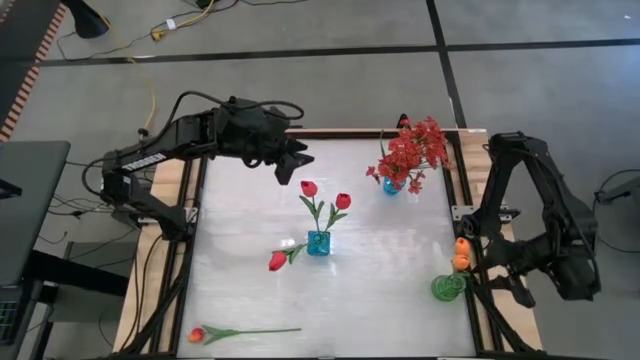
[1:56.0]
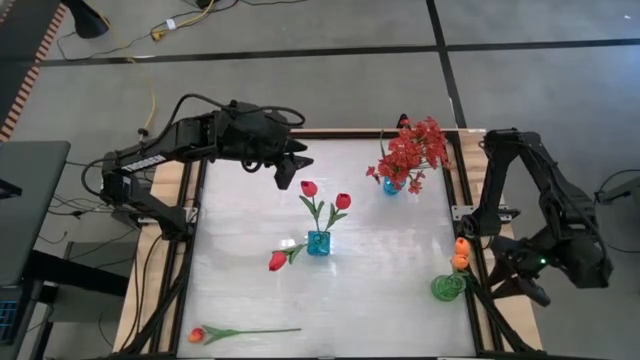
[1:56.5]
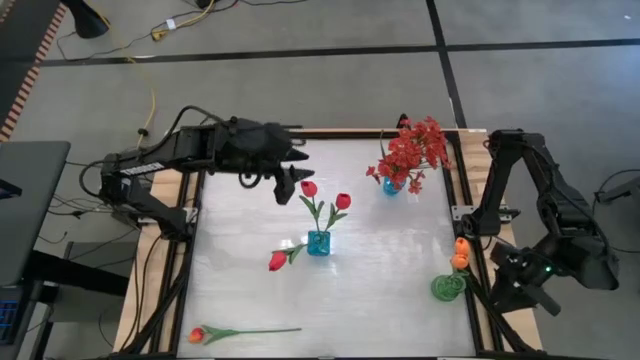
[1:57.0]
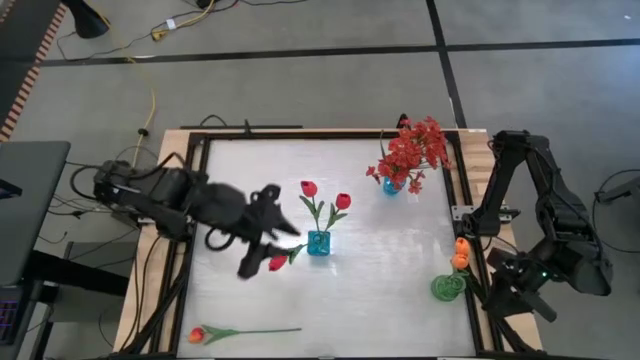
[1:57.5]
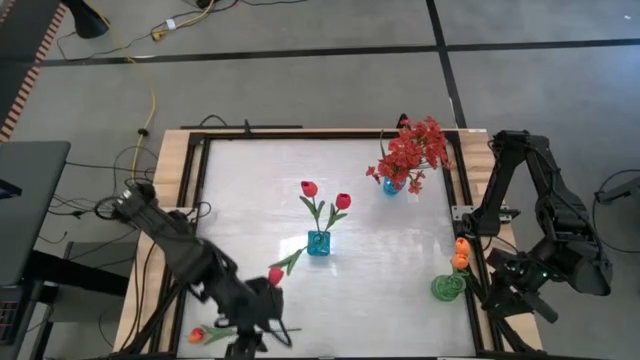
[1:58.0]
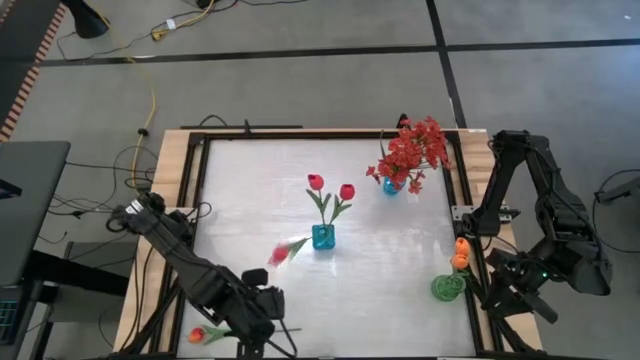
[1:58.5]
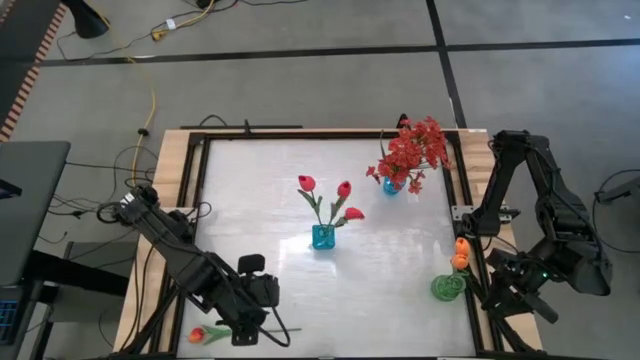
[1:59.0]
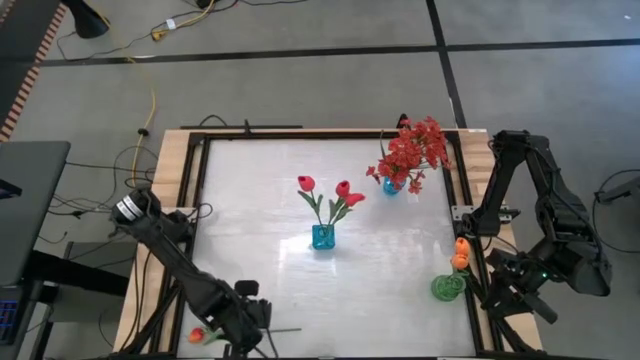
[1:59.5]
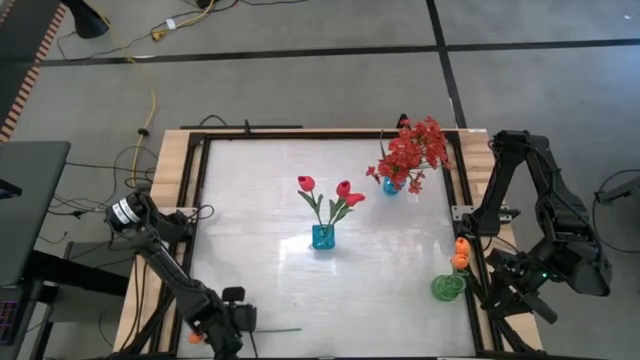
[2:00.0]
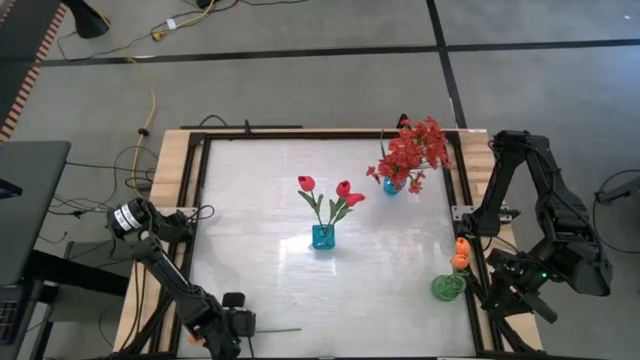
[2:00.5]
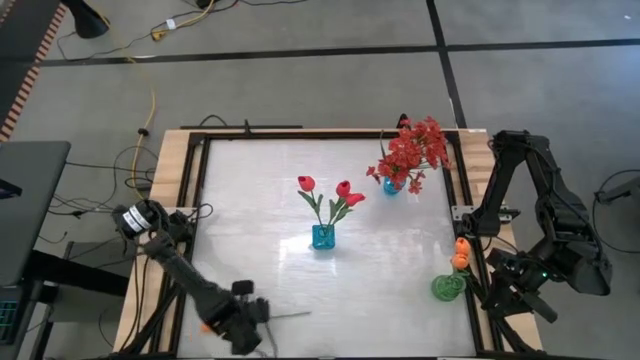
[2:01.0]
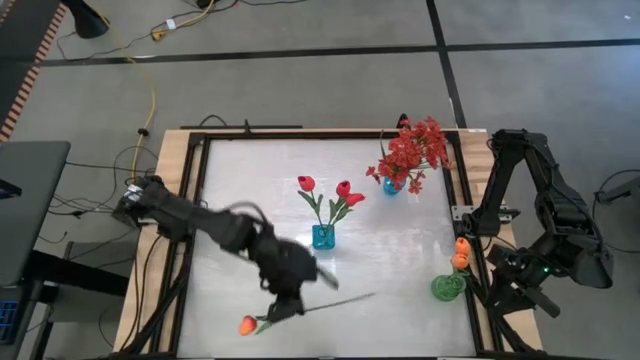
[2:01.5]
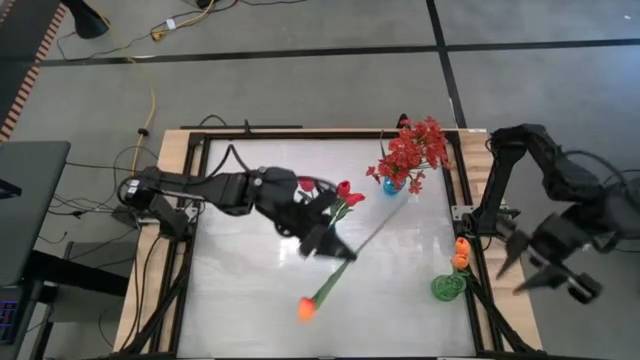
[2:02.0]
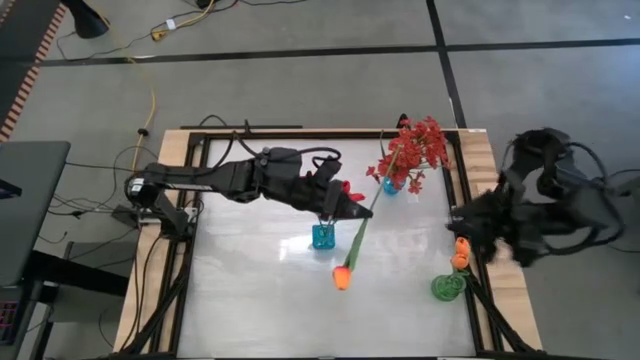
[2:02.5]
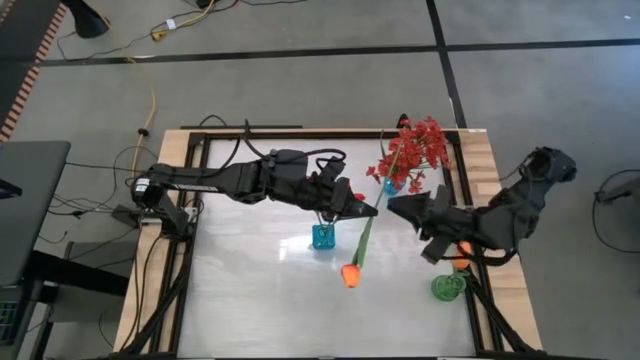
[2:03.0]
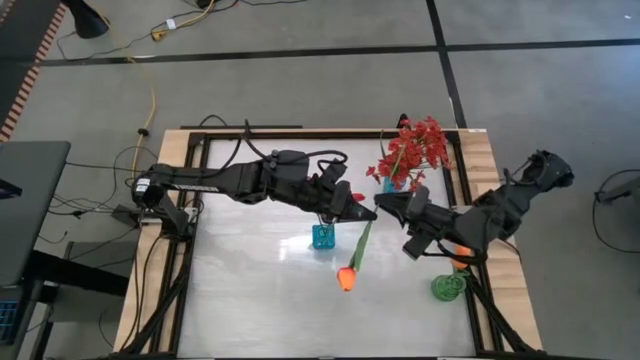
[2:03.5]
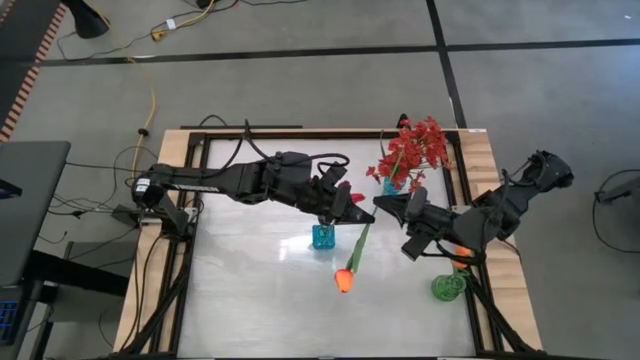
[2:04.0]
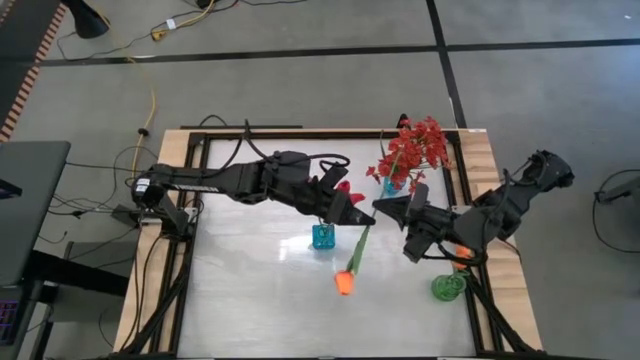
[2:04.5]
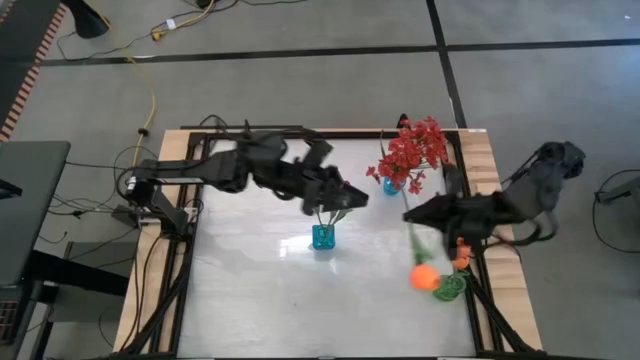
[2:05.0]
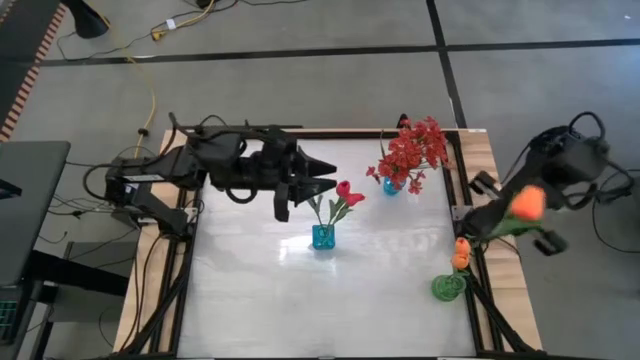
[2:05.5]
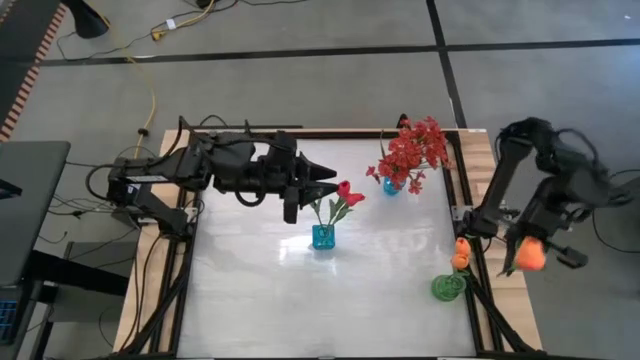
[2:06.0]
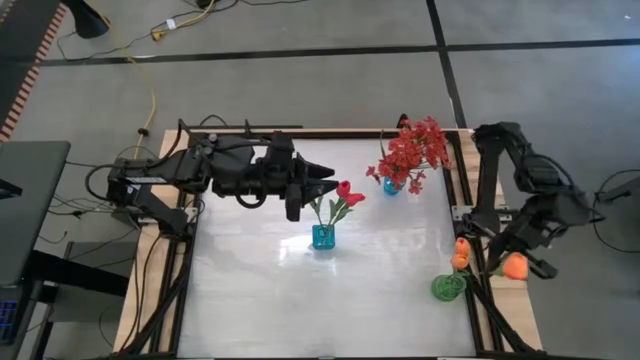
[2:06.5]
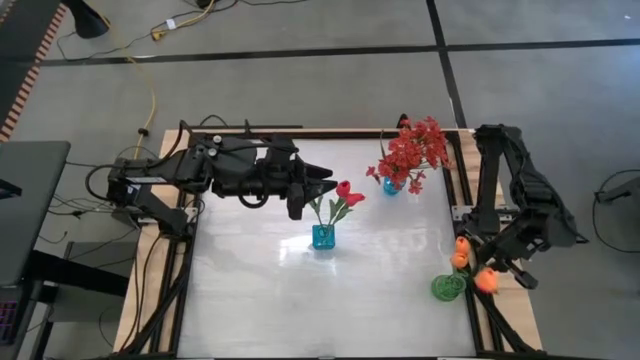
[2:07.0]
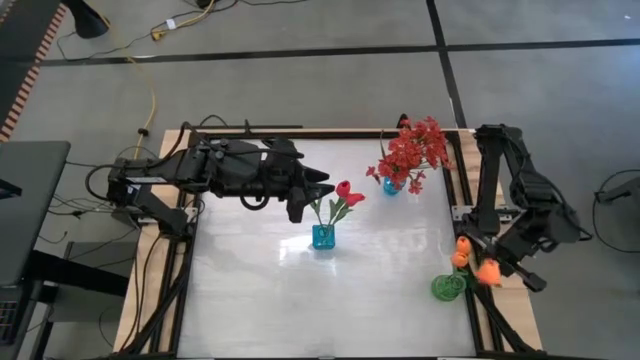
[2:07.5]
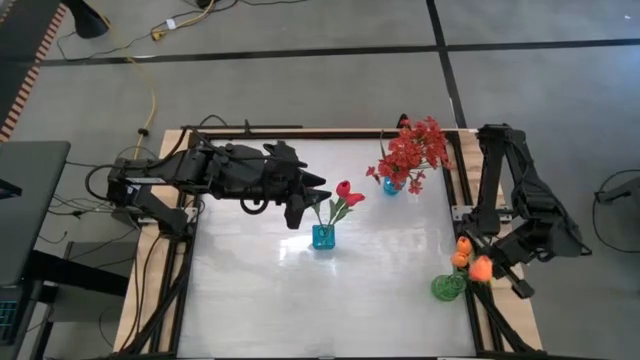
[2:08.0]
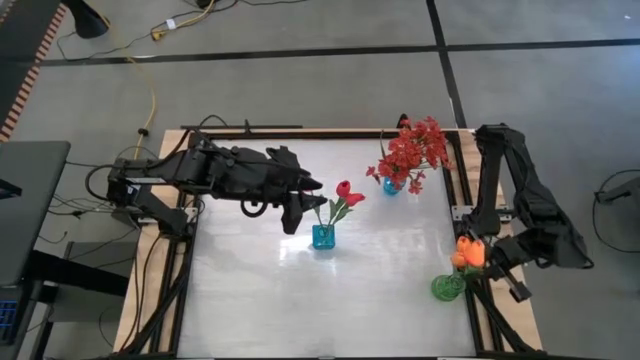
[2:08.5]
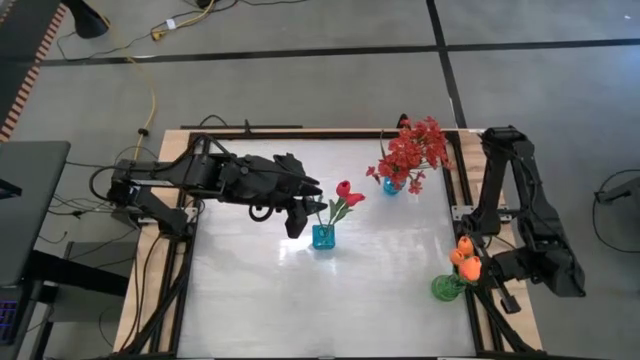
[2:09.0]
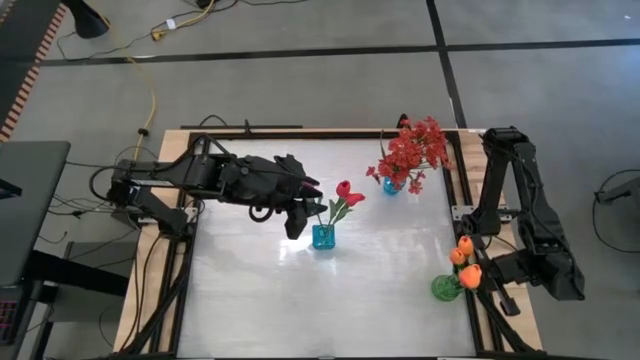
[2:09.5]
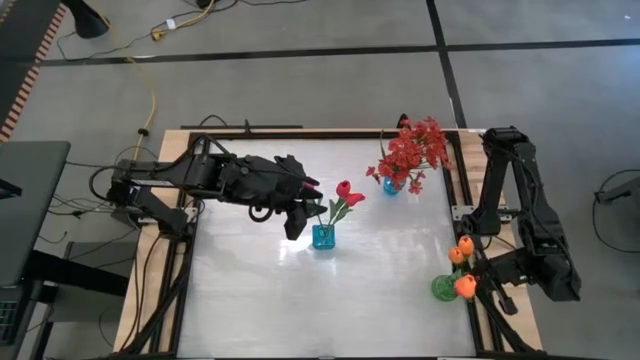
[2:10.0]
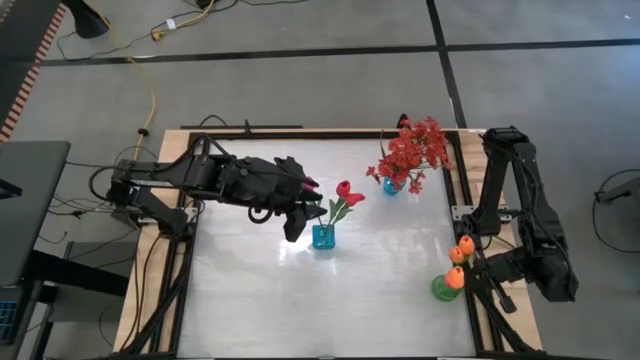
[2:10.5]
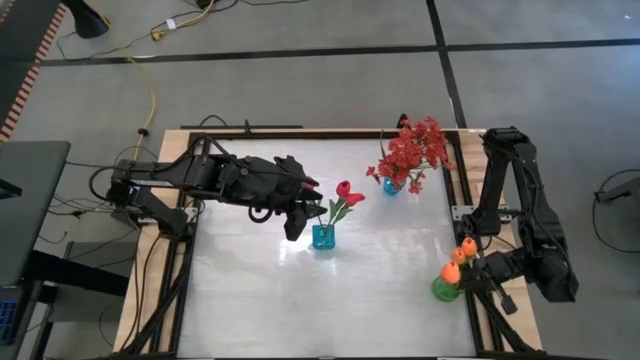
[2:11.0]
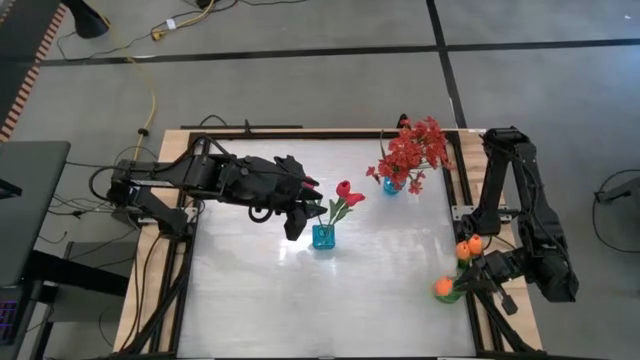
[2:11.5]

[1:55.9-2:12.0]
Task: Sort flowers into vase by color
Put the orange flower into the green vase

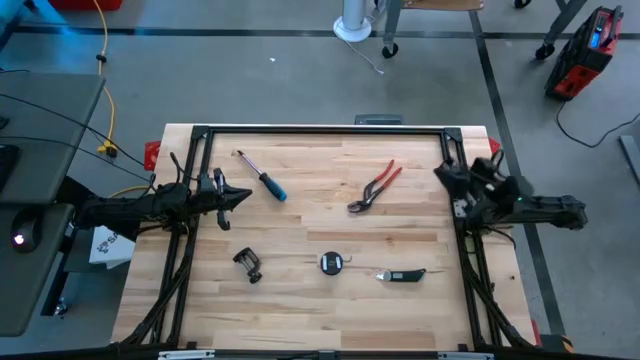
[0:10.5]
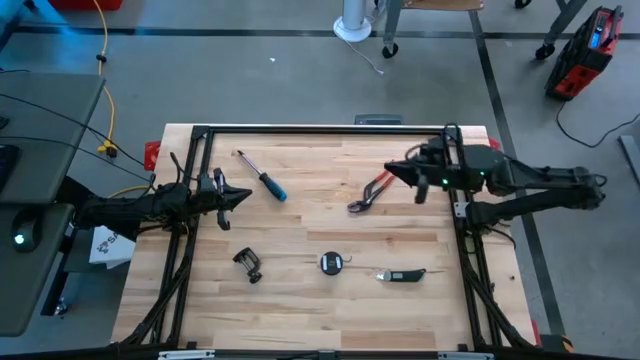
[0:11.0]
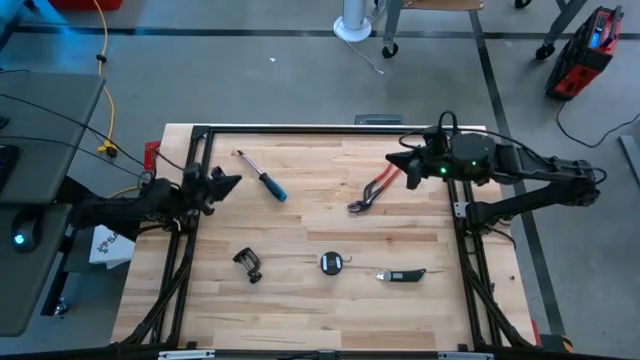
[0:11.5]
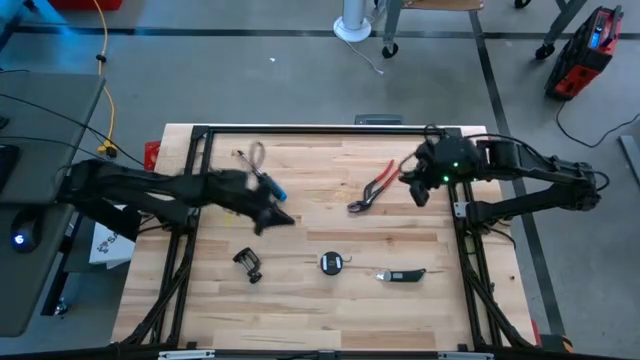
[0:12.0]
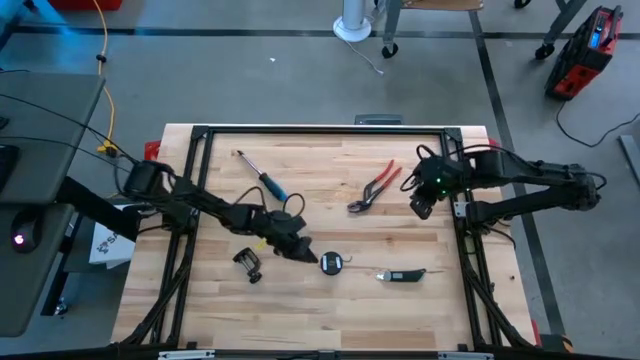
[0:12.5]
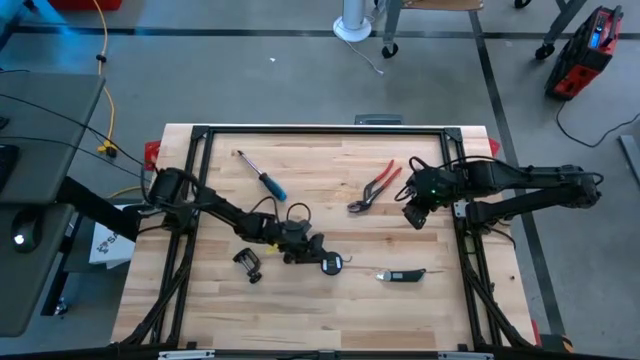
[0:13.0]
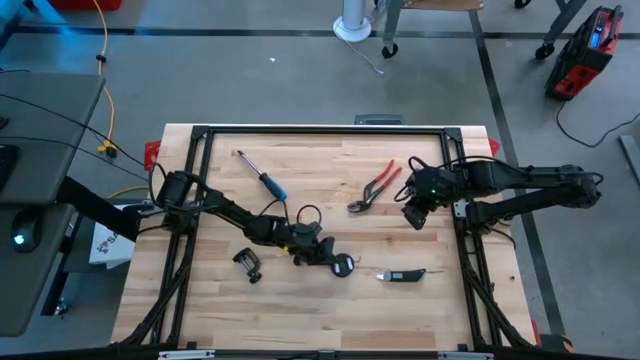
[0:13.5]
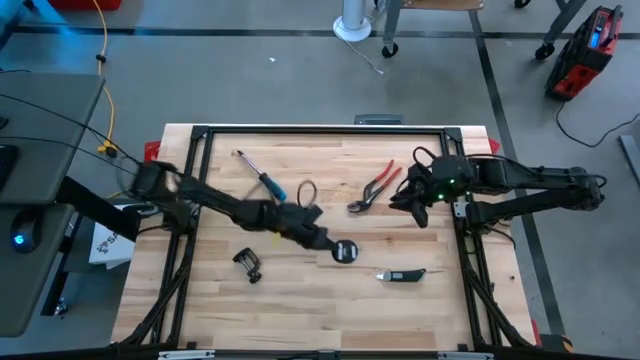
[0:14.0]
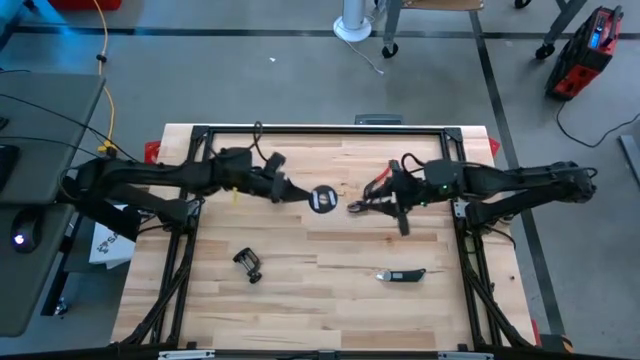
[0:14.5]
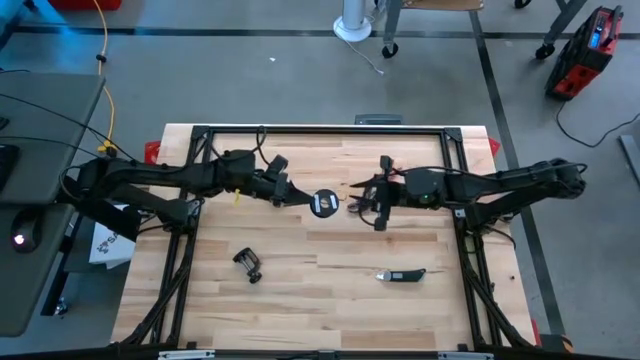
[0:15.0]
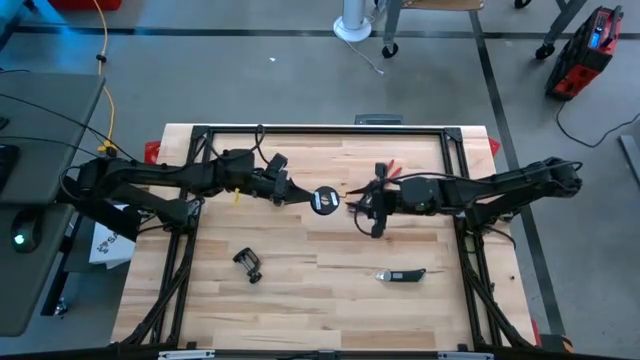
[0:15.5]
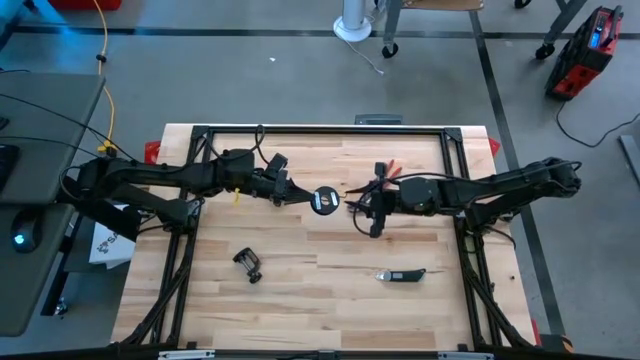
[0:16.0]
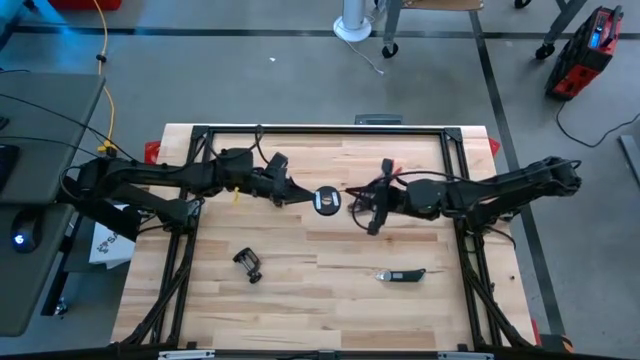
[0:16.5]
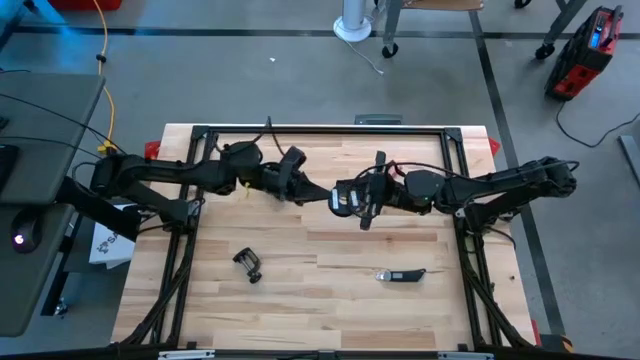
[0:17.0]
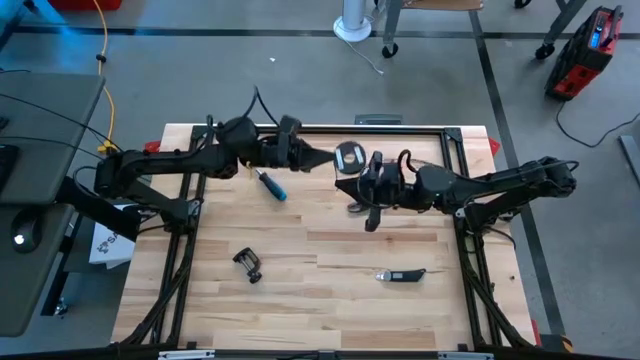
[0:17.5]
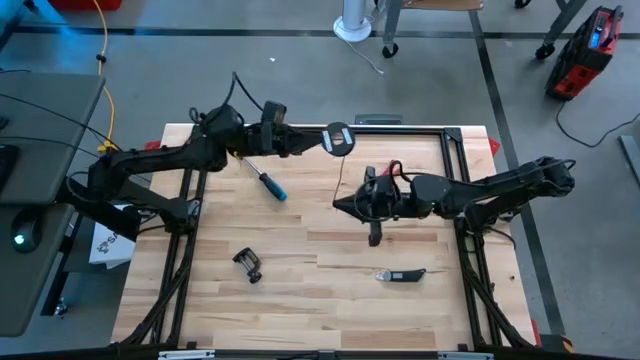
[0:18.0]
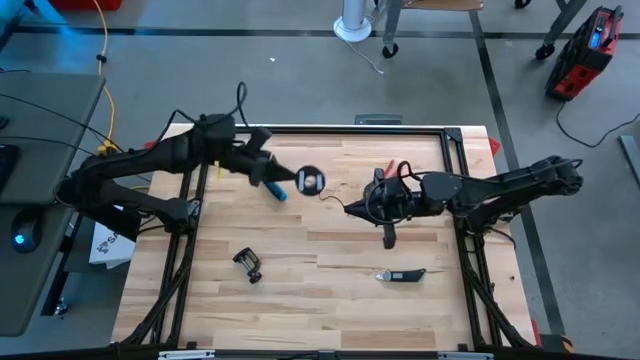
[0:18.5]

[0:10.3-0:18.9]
Task: Coil cords
Uncoil the black wire from the black spool
